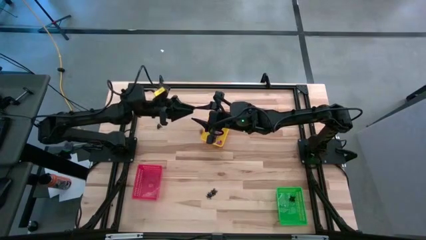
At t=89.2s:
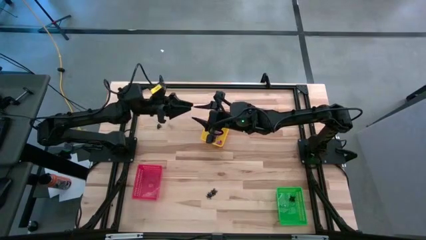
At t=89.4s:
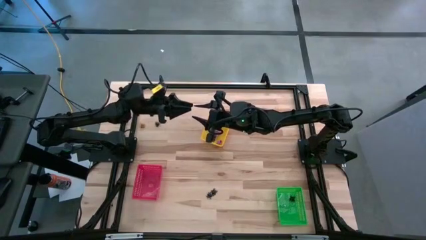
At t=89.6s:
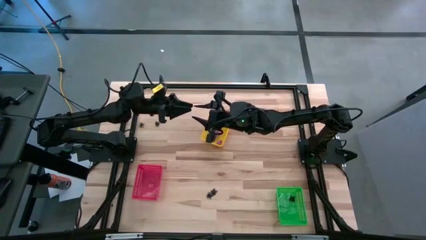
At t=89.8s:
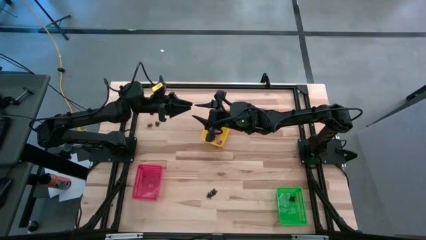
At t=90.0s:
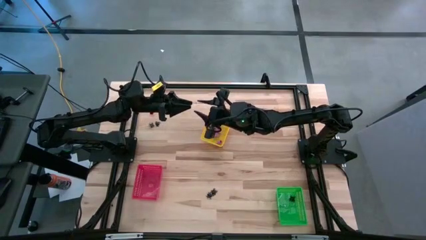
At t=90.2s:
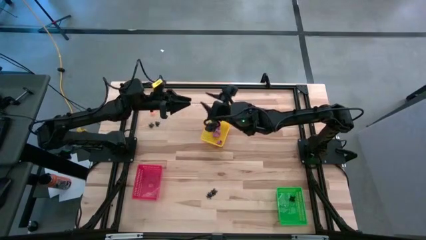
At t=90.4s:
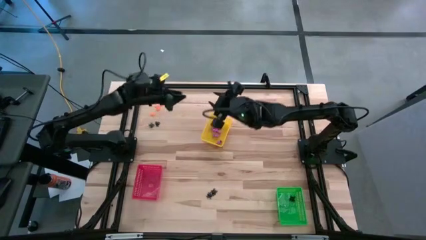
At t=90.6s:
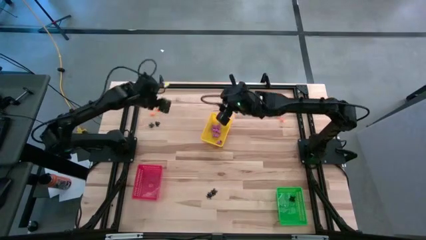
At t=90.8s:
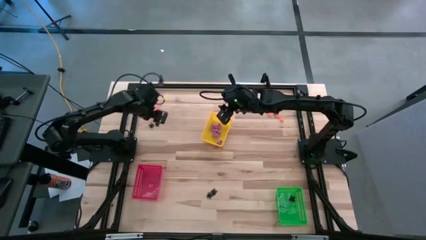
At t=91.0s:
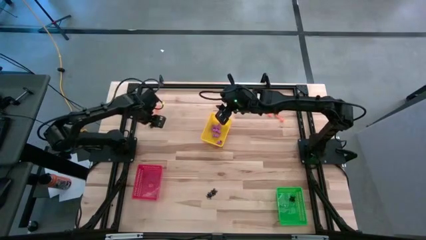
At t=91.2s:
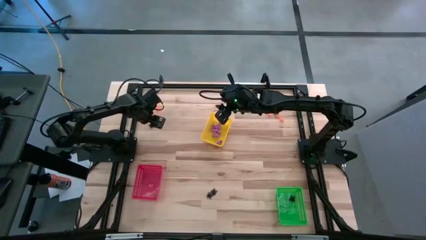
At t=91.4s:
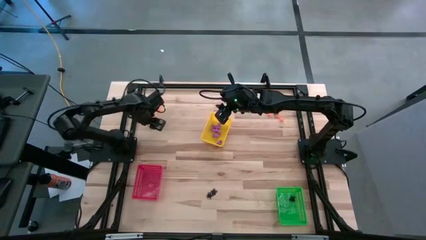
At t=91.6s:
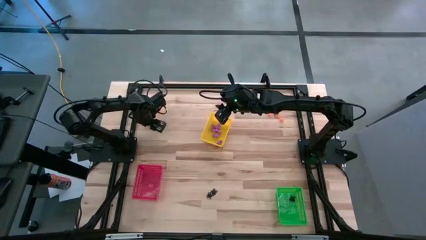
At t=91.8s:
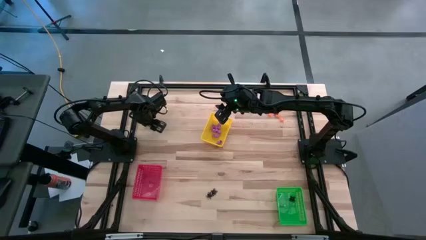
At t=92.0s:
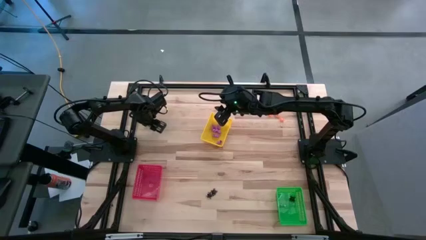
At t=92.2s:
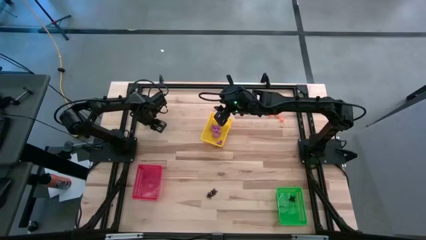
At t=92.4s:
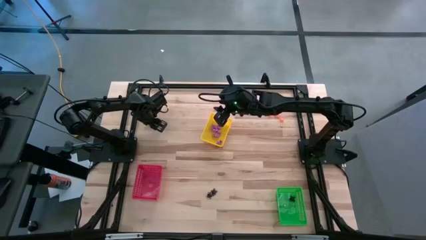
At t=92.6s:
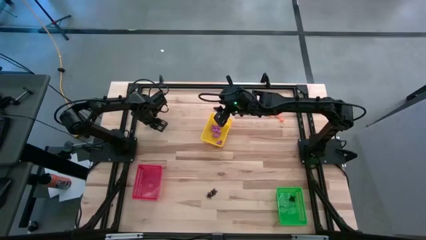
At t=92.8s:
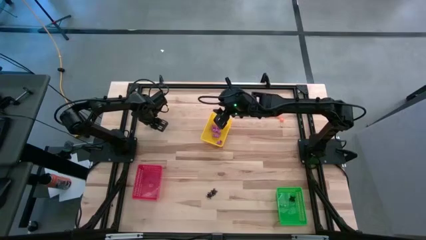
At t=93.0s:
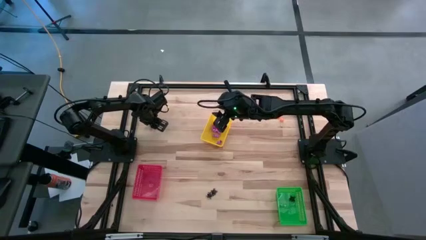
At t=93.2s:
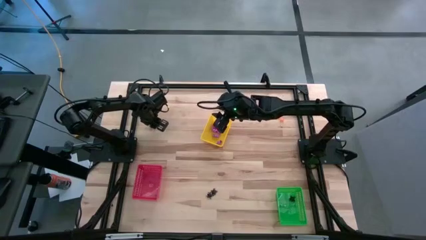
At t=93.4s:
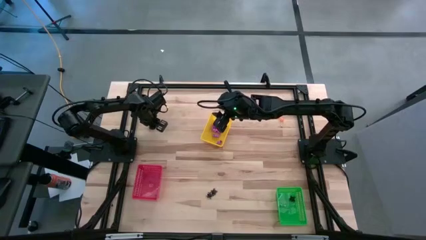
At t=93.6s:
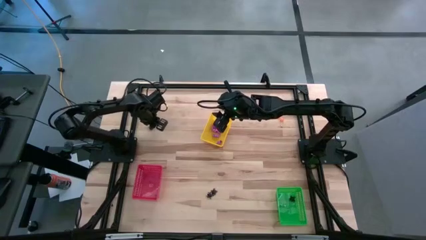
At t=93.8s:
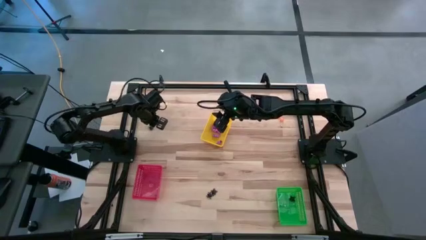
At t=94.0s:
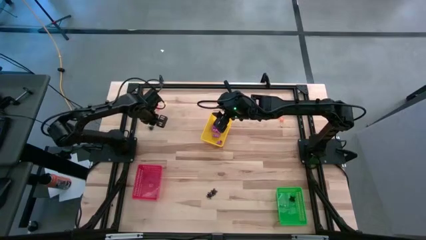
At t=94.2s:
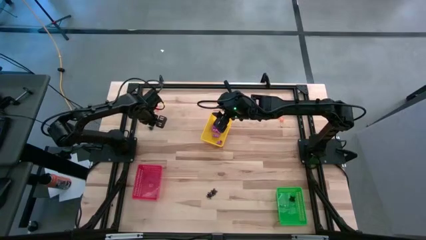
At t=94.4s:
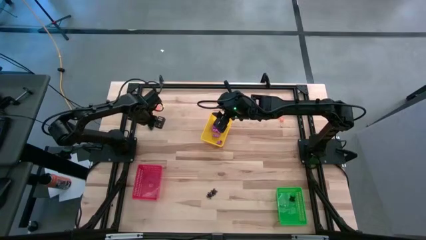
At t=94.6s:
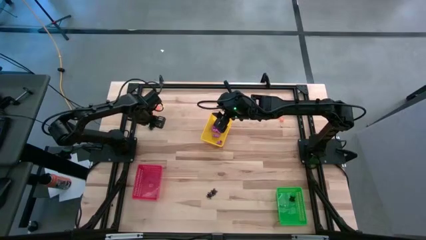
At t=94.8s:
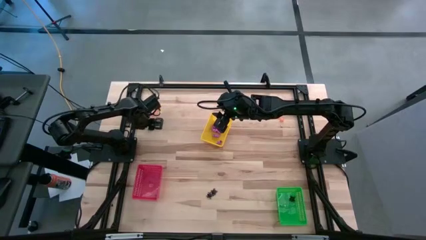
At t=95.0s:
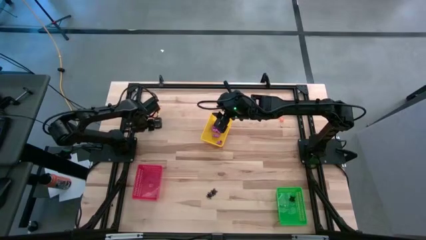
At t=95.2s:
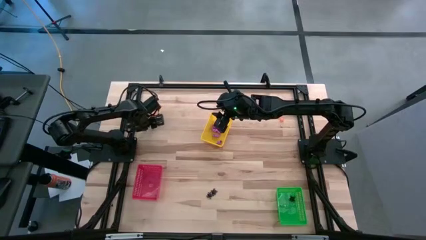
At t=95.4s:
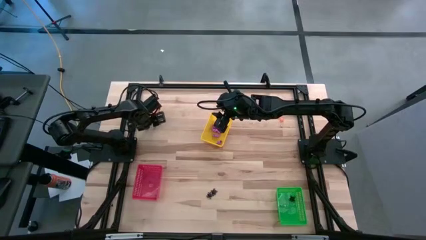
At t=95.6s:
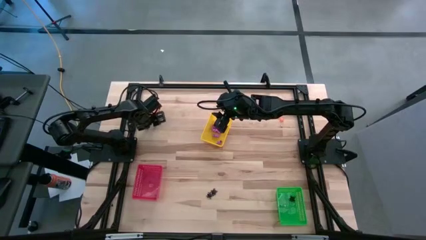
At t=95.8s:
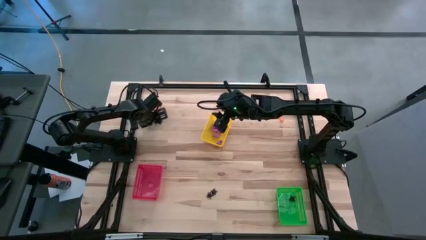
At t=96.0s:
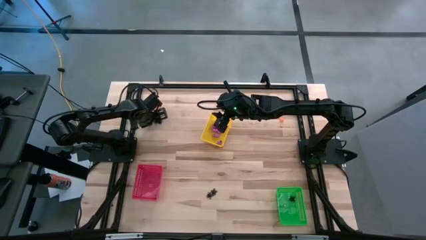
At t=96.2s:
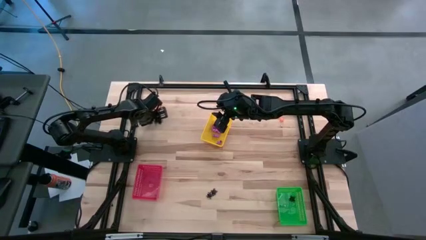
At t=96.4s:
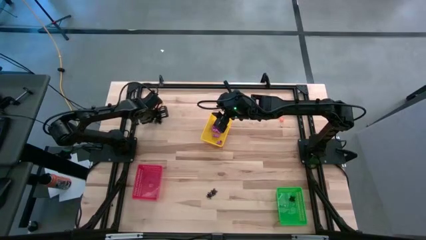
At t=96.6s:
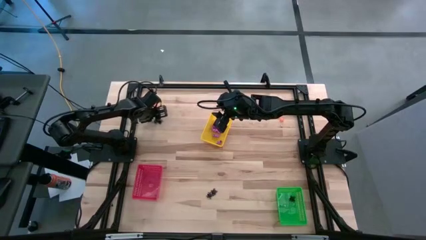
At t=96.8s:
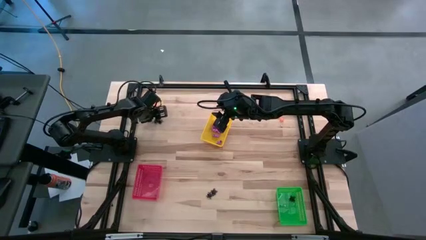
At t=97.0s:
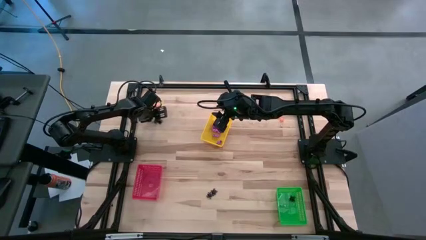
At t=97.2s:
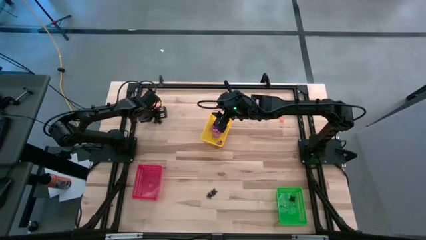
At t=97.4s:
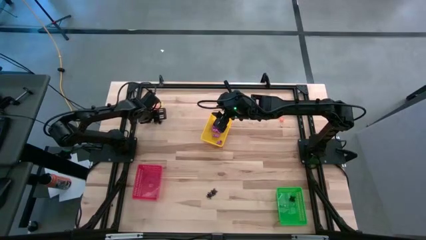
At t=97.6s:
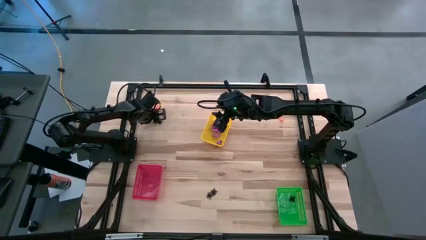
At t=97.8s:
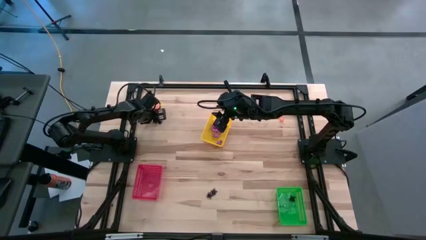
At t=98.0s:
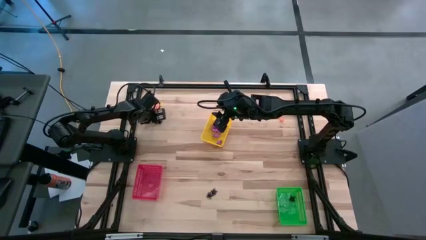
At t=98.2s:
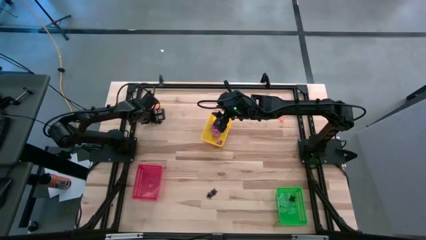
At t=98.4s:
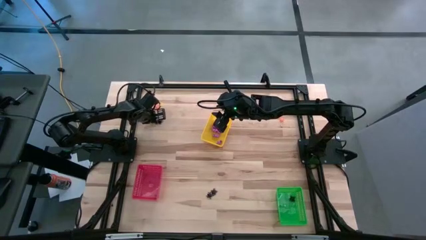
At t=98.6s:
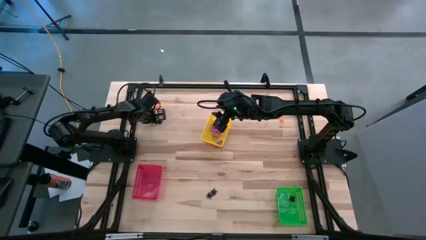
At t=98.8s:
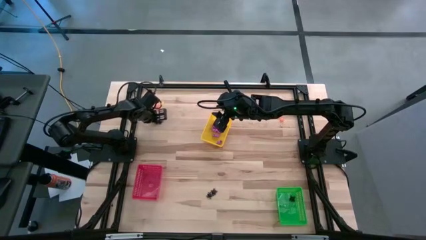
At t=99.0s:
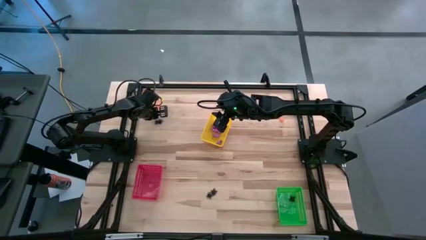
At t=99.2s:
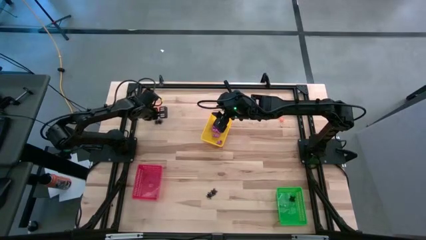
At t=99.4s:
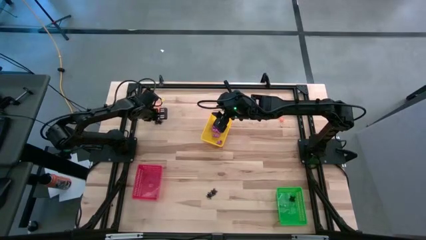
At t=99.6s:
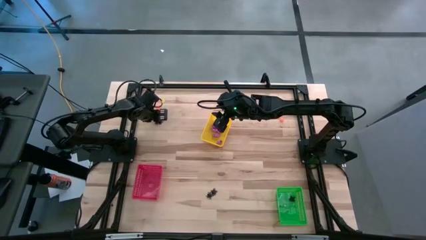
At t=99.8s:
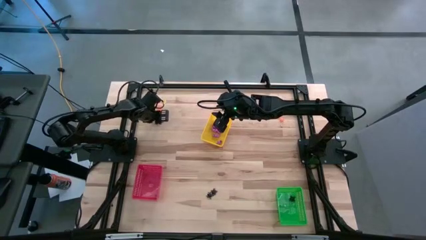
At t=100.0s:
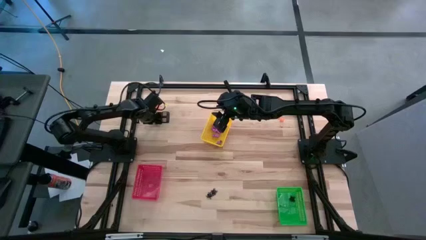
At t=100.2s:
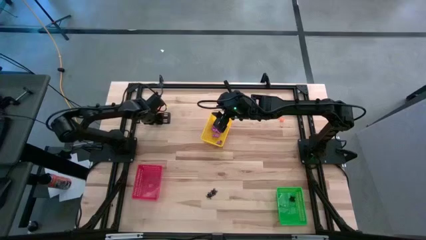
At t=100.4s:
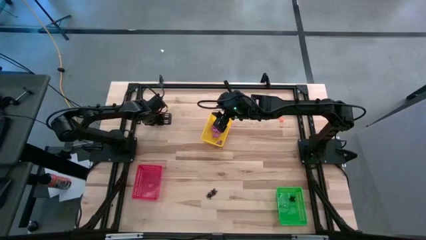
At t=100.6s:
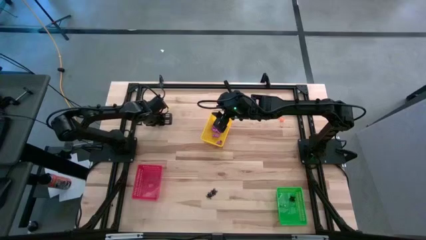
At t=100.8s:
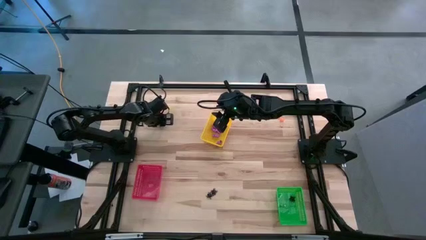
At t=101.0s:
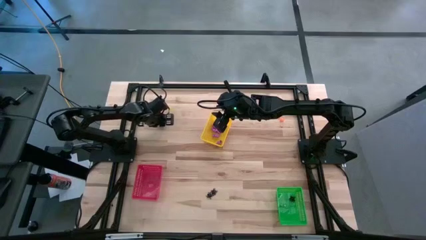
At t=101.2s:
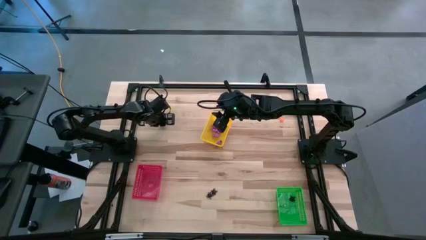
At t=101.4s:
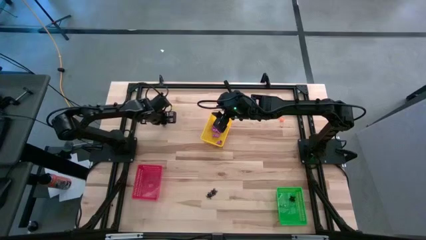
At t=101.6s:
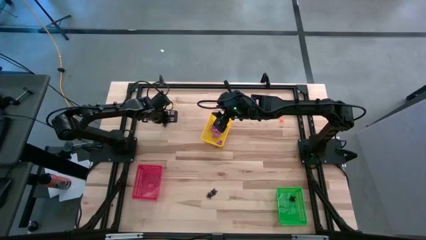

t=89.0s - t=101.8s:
Task: Sort Halloween decoration
Put the black spider toy into the green bin
